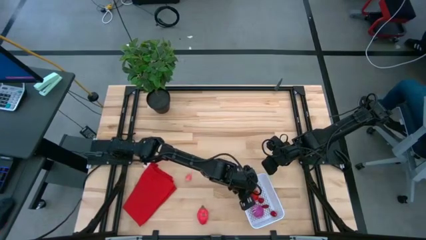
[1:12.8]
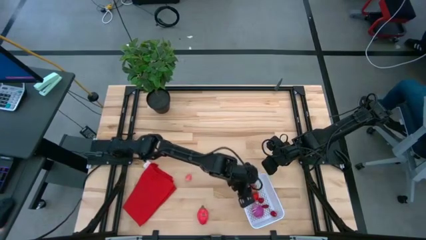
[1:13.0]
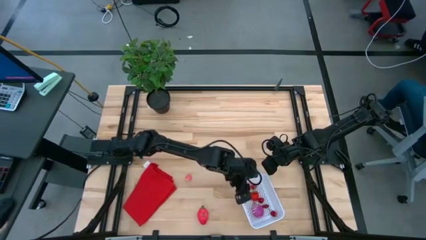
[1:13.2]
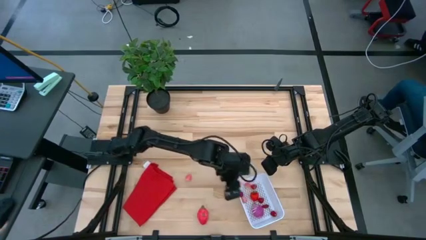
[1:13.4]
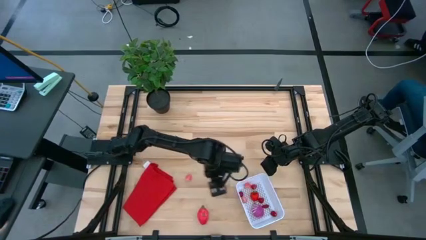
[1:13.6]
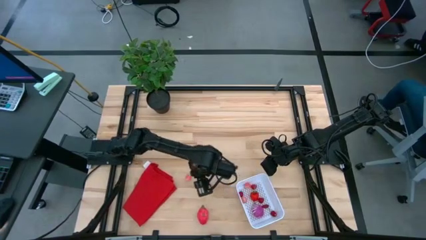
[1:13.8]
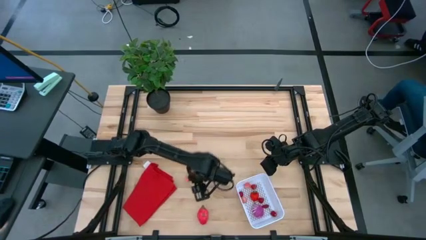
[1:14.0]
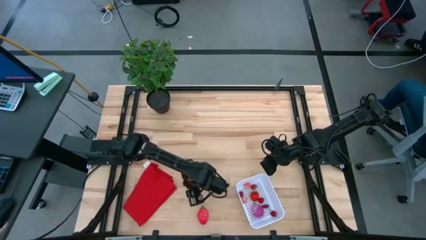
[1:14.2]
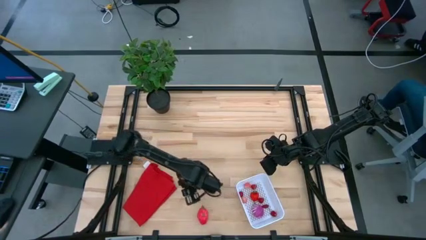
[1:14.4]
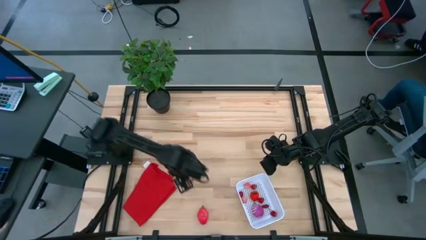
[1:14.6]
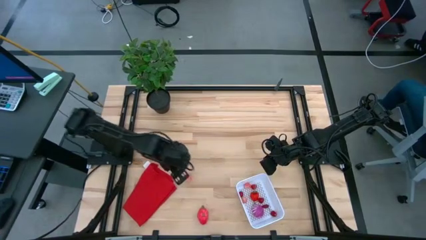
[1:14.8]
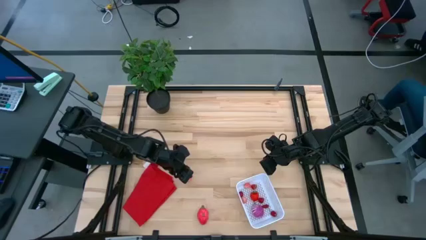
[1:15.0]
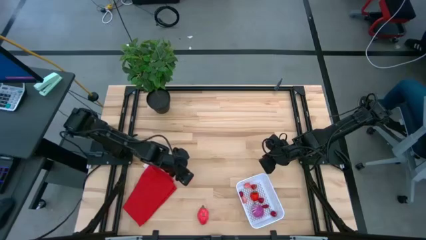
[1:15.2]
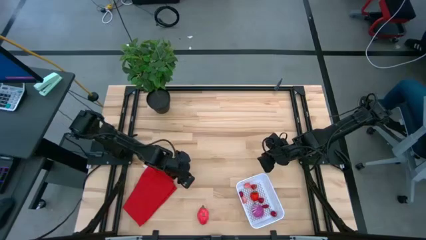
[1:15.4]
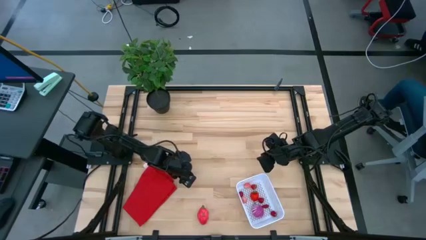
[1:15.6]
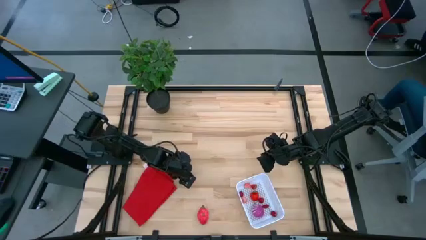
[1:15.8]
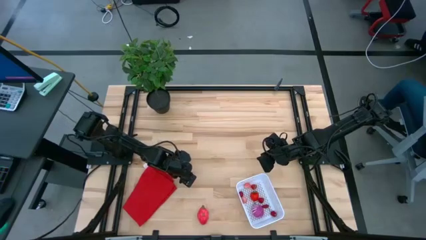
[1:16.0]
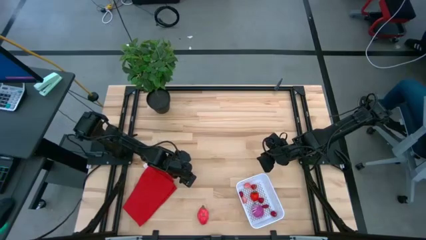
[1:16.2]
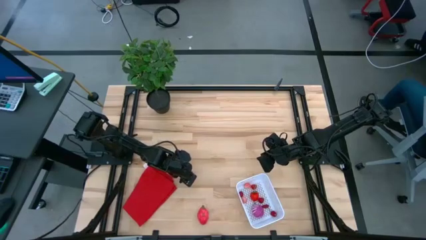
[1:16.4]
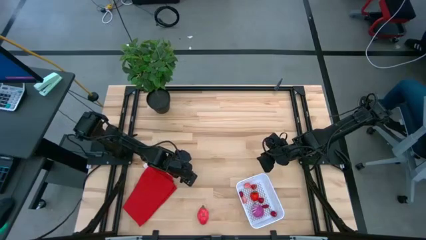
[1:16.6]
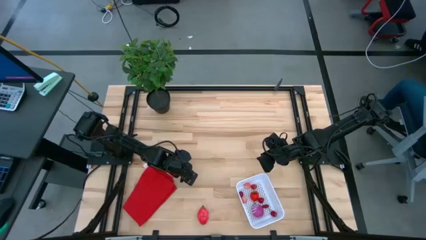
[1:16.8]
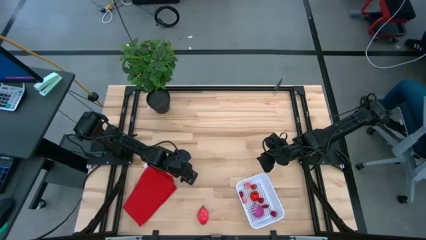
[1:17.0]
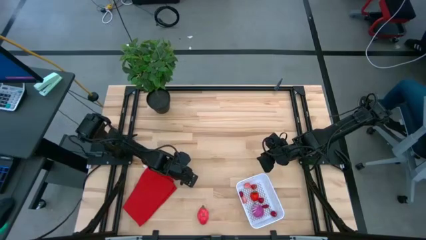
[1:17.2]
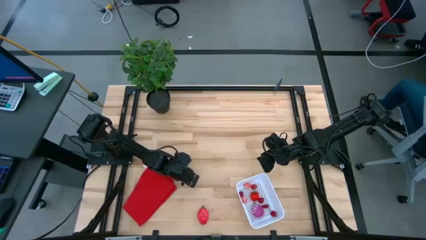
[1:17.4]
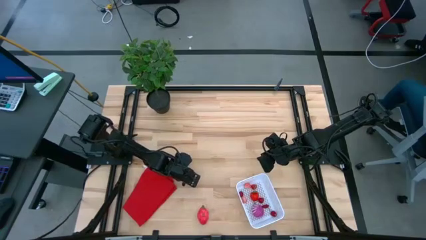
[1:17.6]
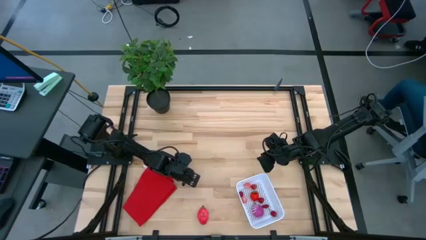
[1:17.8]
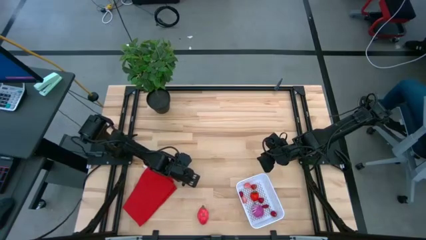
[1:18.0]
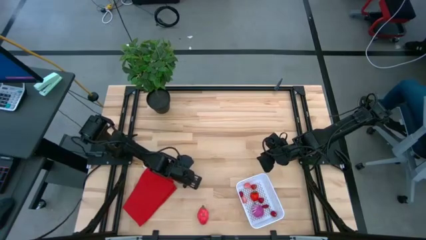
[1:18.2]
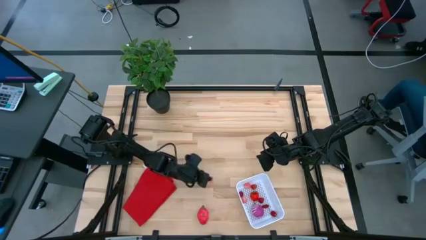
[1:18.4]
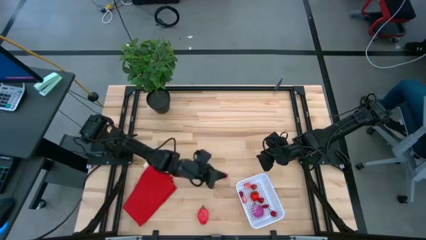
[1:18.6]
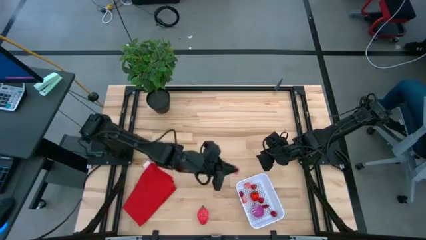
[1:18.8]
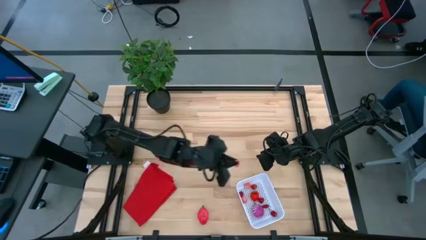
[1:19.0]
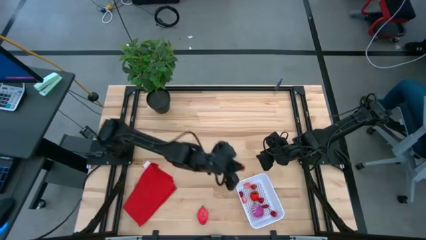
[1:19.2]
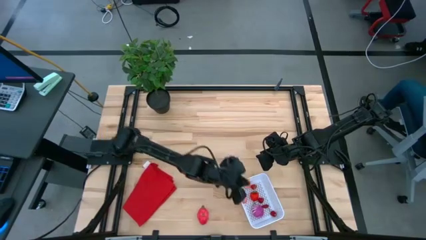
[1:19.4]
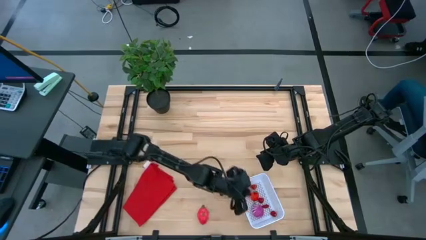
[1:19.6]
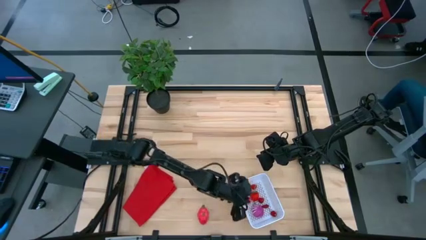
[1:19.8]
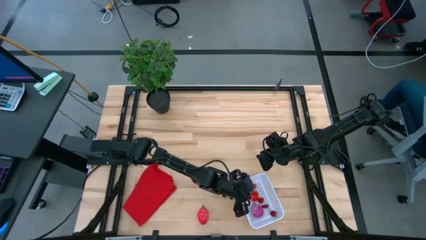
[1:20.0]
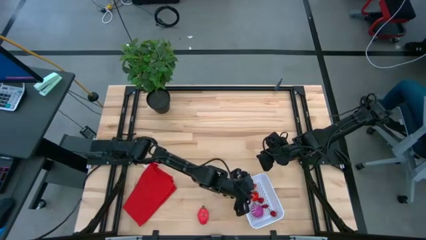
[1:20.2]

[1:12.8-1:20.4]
Task: Pick and placing Produce into tupperware
Put the peach into the white basket

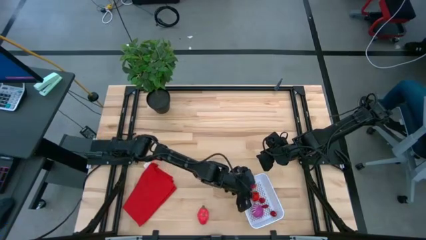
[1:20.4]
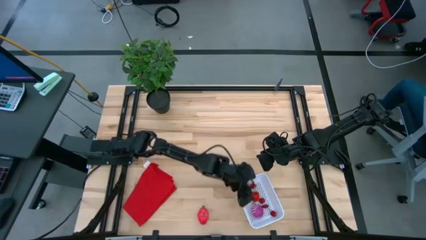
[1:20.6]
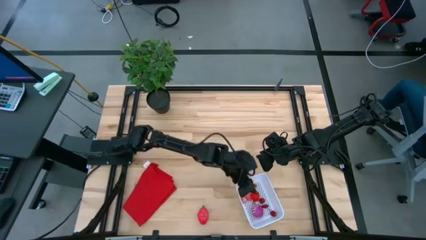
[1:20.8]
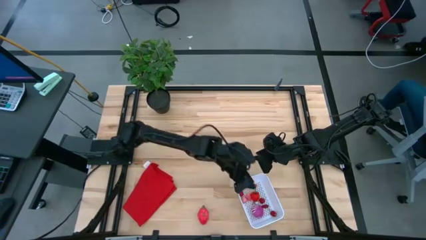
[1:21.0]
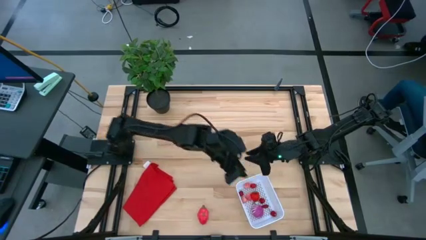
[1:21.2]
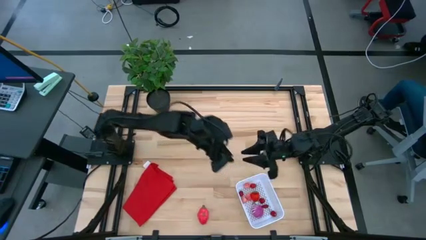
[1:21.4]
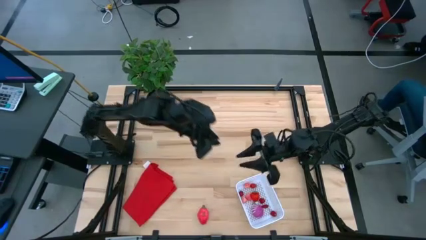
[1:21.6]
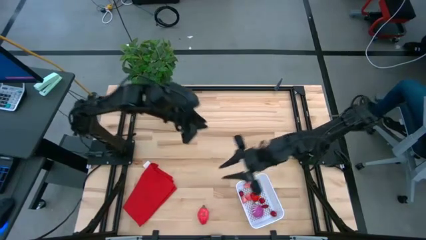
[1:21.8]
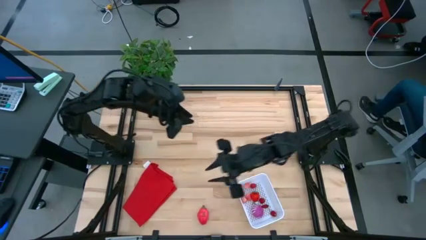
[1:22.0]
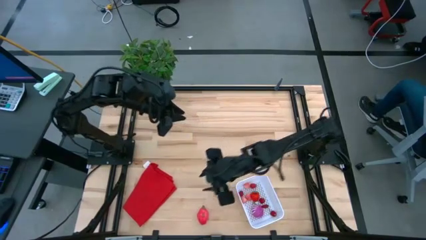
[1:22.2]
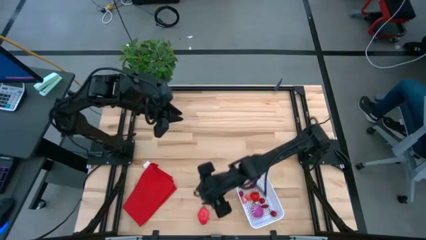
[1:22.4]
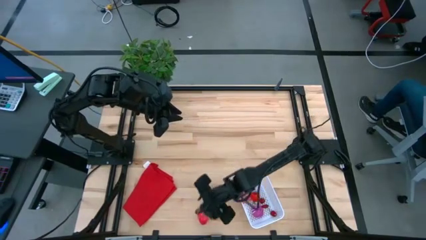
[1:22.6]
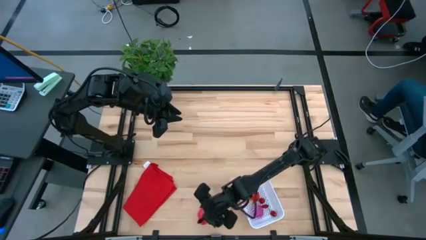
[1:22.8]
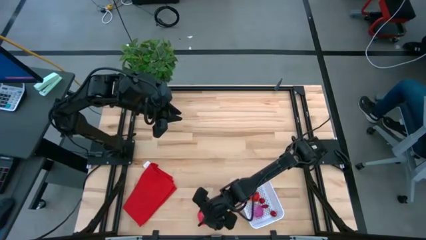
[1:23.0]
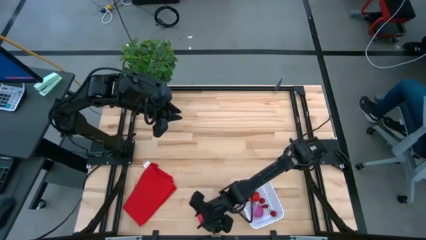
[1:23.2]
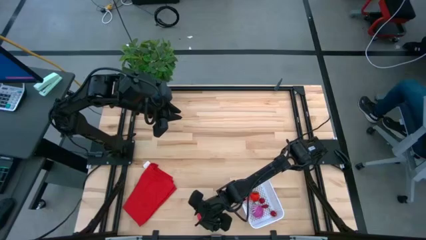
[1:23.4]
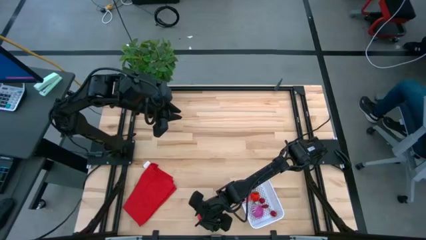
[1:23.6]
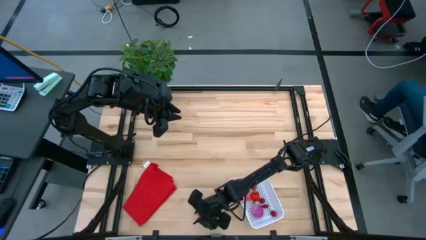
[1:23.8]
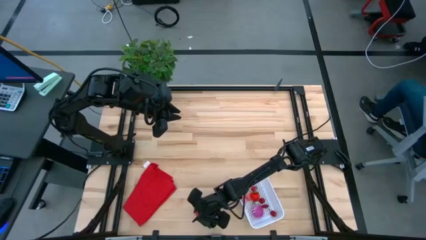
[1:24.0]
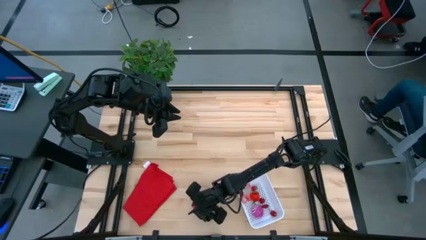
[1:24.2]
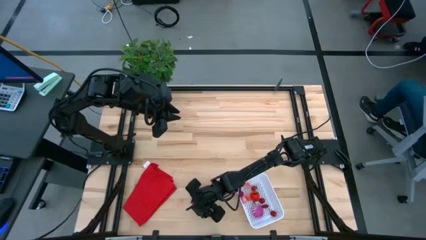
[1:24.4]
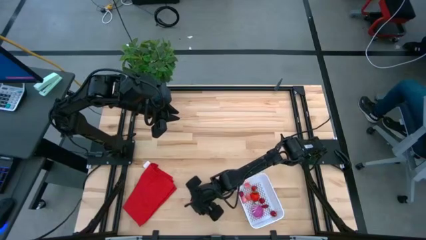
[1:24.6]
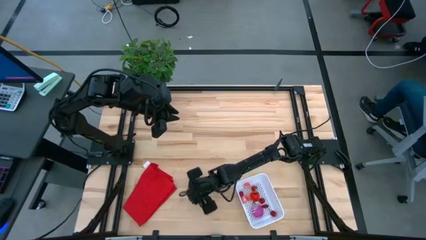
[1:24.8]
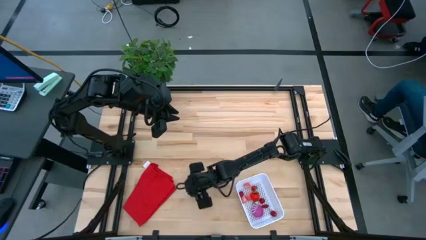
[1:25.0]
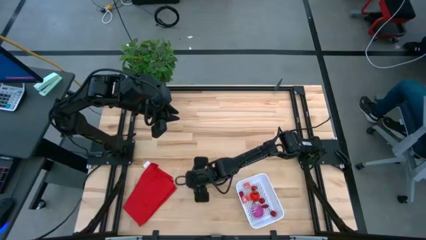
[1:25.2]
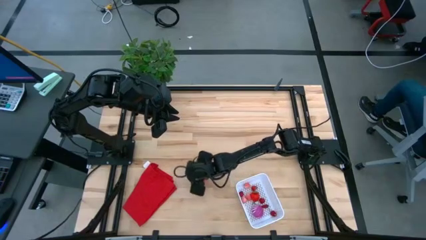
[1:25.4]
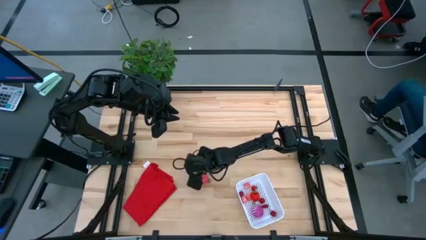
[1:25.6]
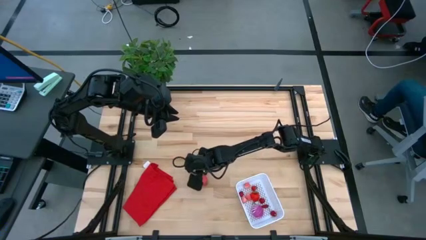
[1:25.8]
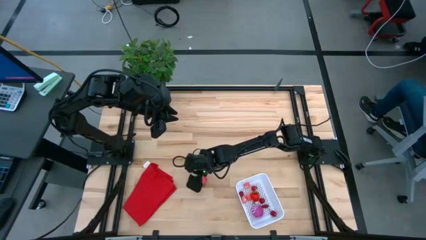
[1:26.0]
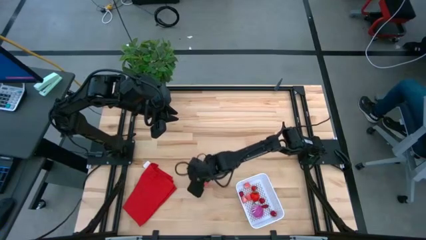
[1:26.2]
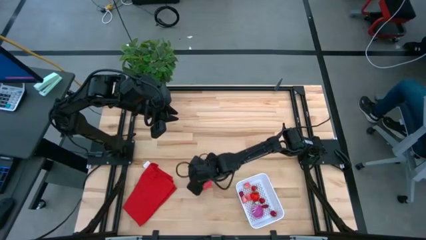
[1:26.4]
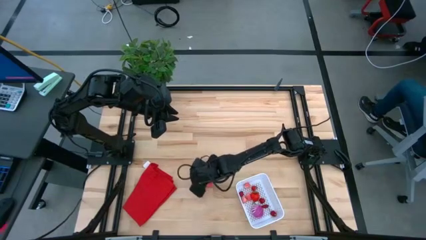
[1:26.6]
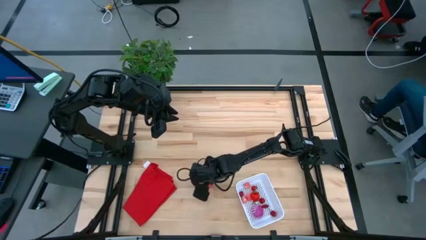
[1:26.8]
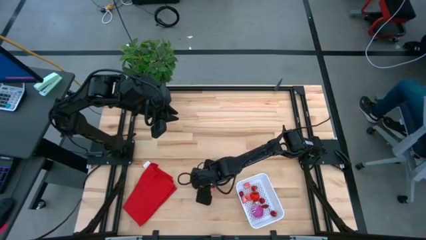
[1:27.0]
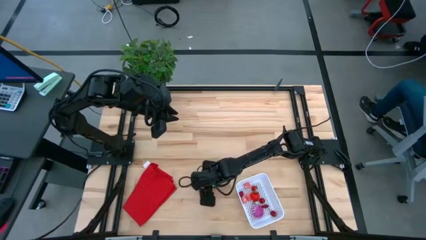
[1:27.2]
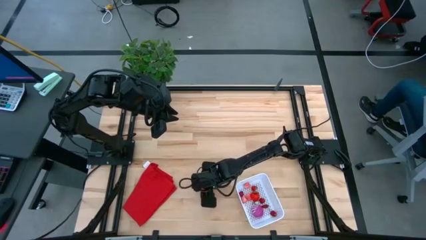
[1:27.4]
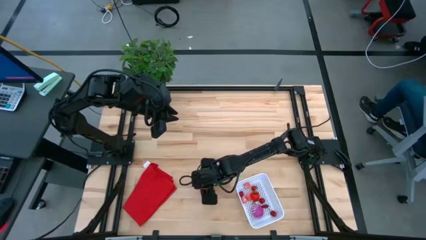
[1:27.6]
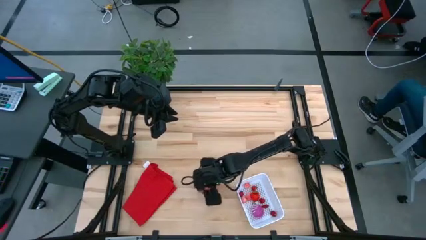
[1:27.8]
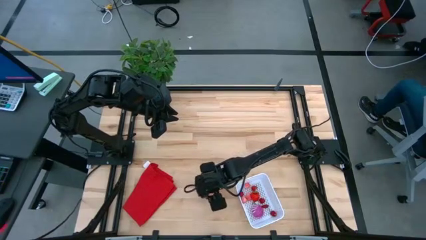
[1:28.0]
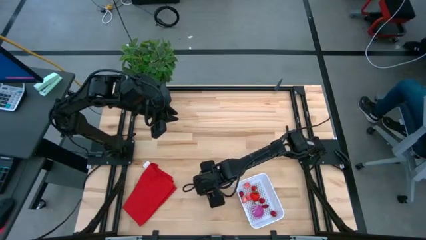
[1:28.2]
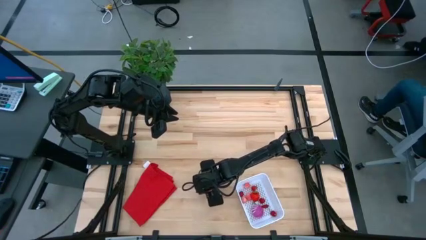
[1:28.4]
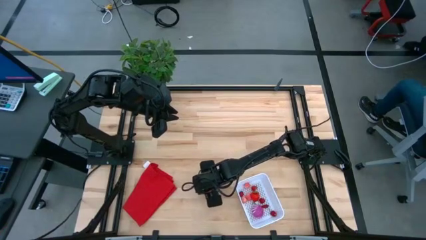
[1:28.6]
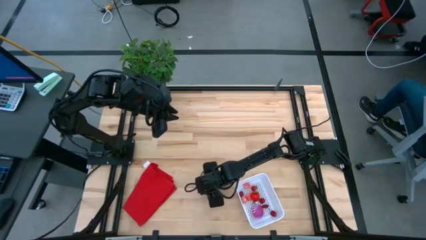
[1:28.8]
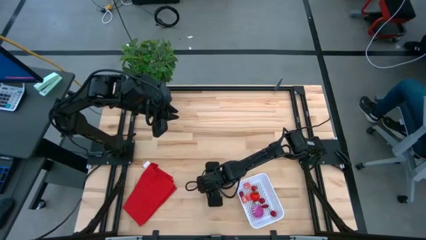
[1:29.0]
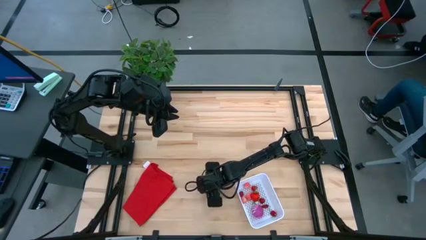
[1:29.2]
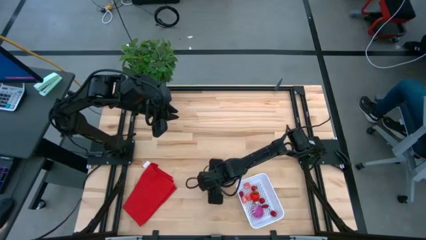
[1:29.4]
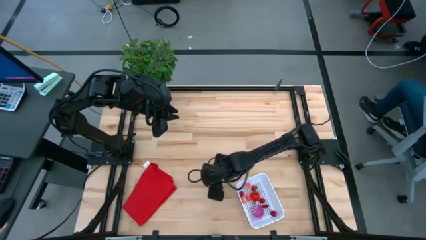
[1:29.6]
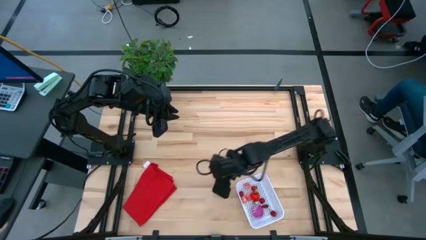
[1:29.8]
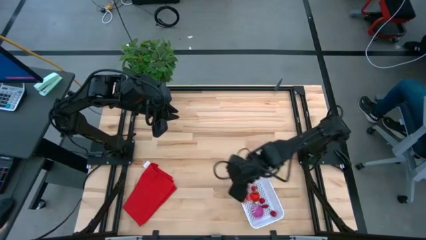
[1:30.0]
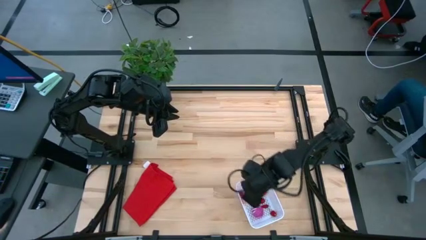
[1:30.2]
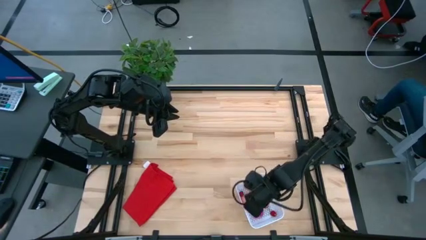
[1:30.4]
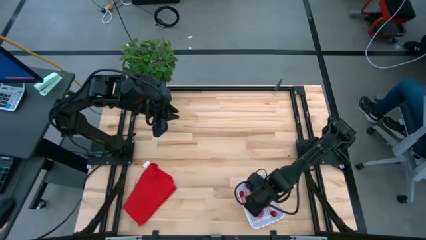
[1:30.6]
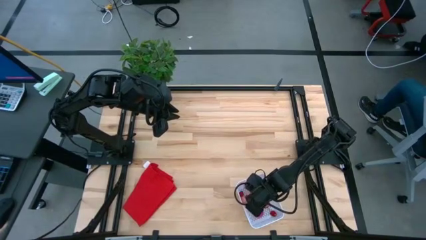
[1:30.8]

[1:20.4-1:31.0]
Put the red dragon fruit into the white basket
